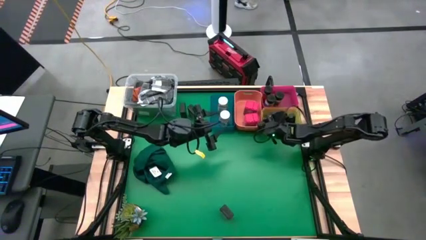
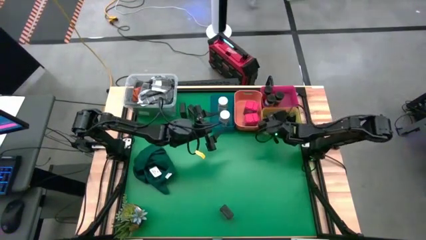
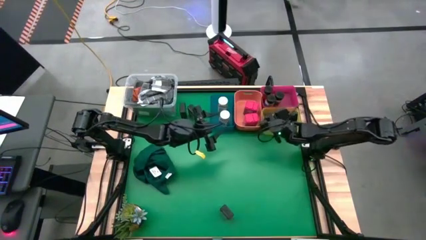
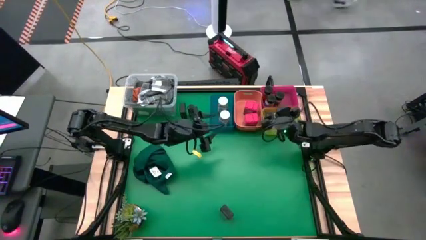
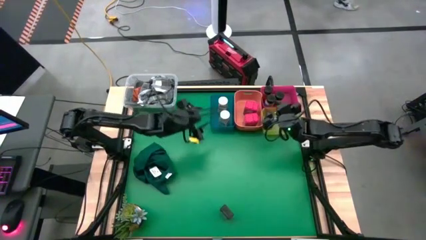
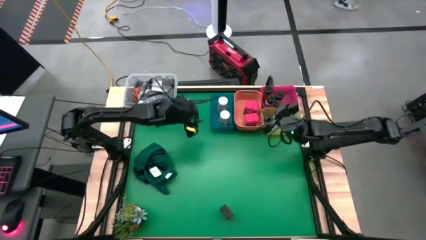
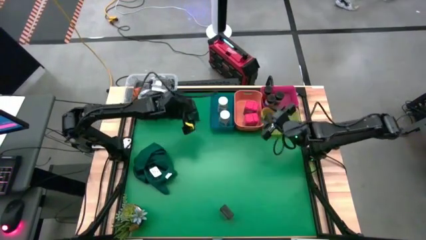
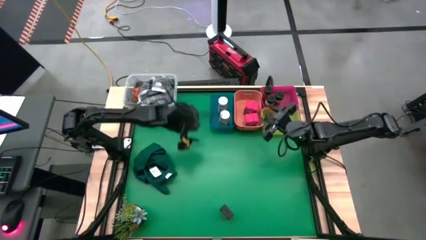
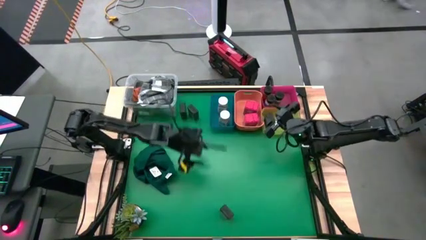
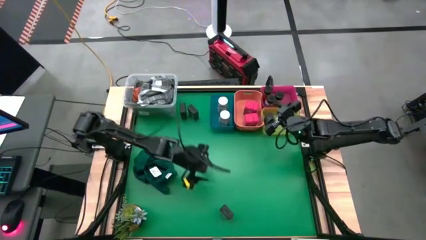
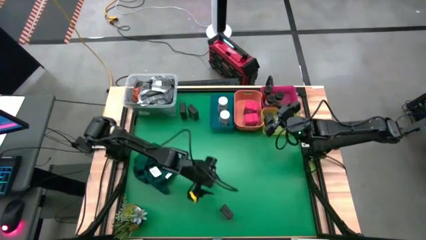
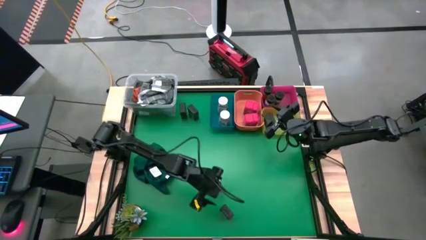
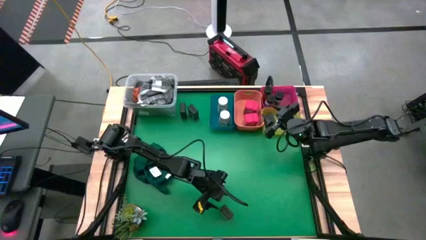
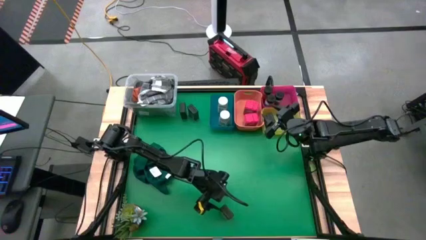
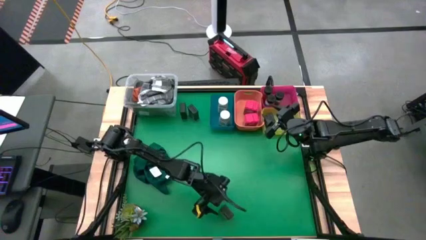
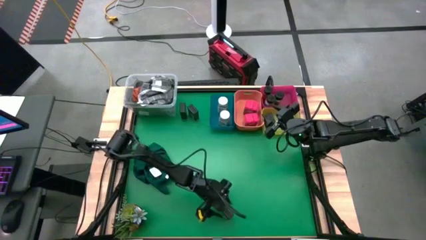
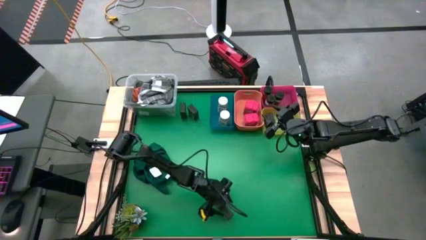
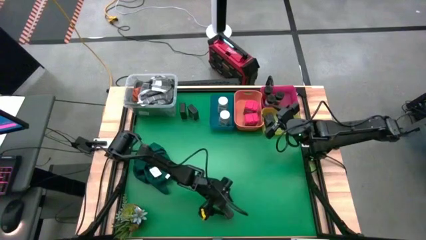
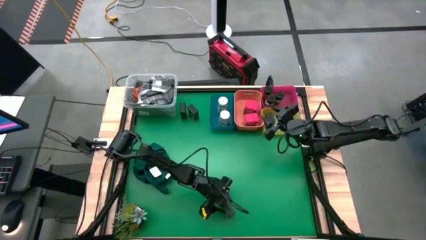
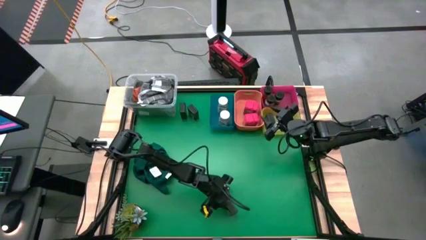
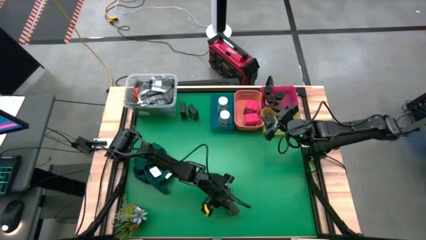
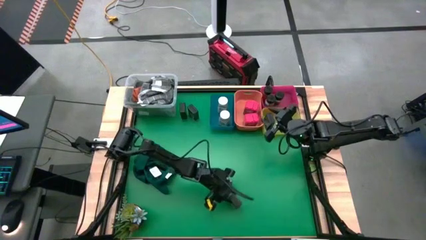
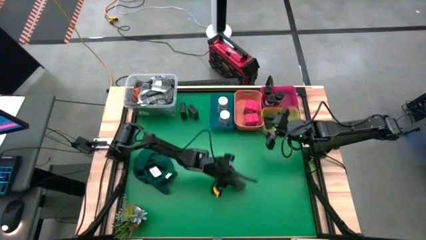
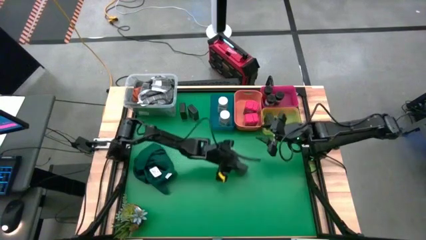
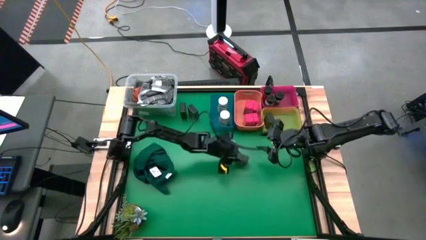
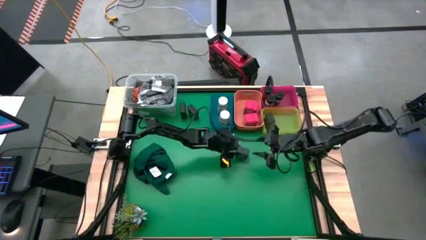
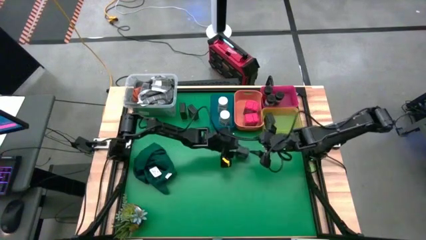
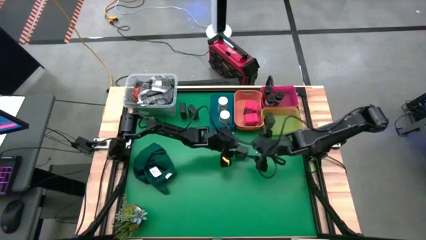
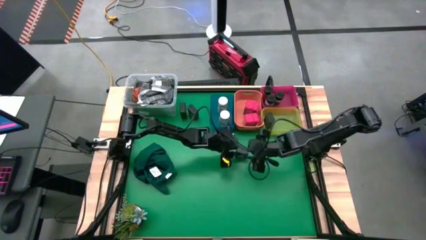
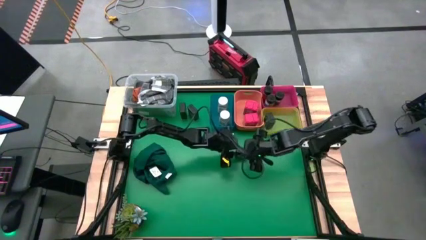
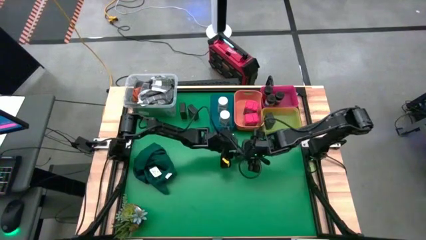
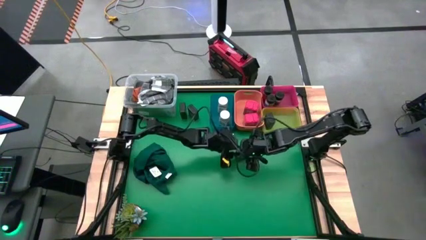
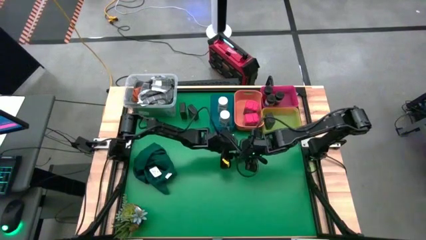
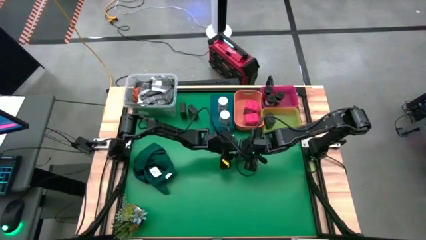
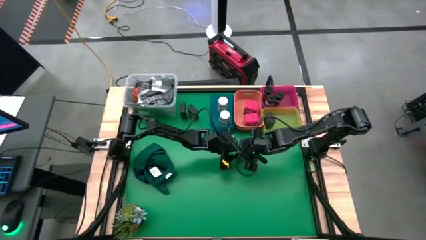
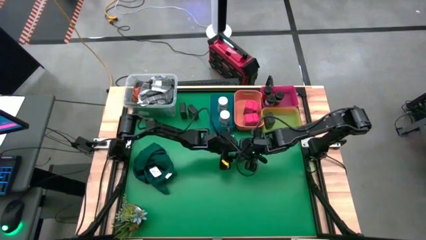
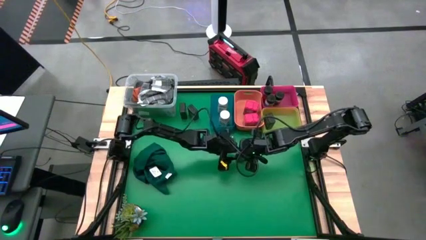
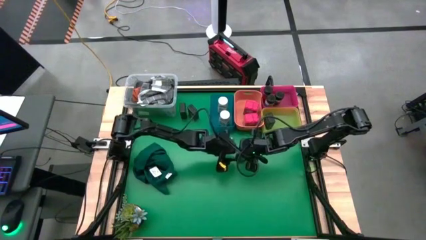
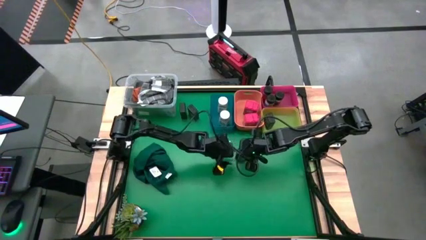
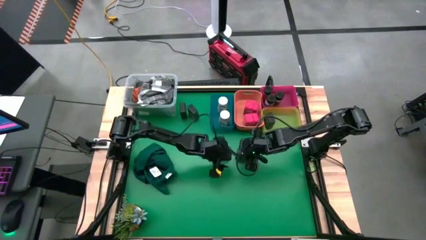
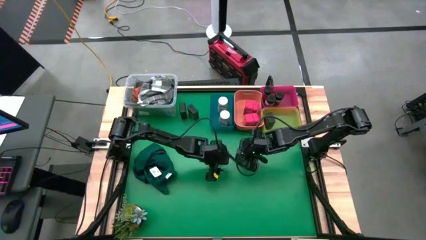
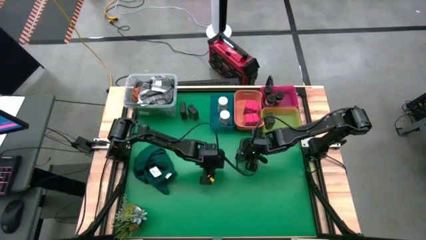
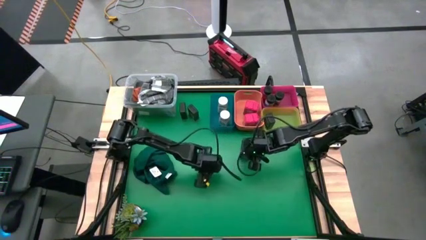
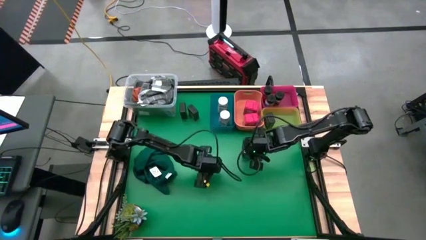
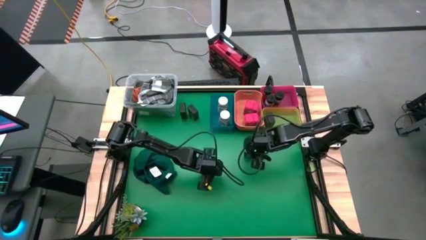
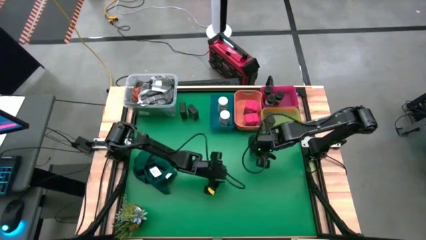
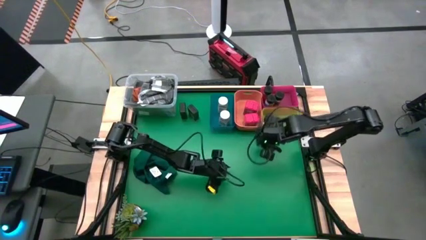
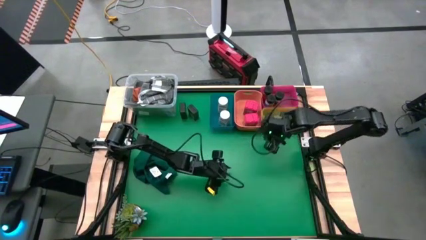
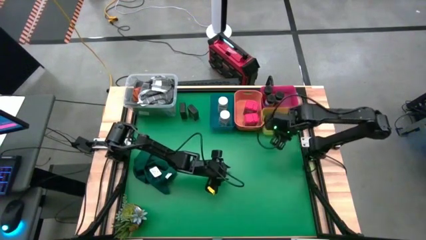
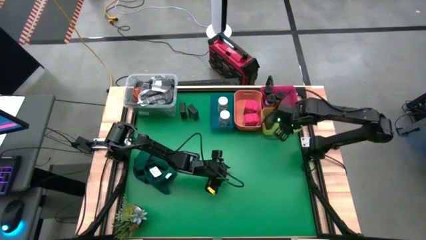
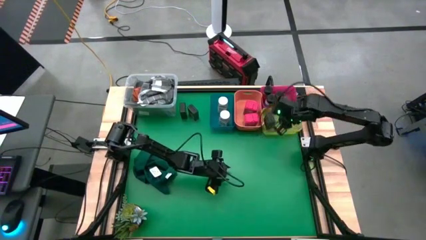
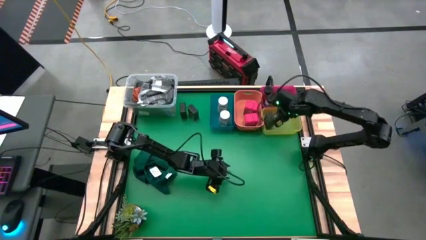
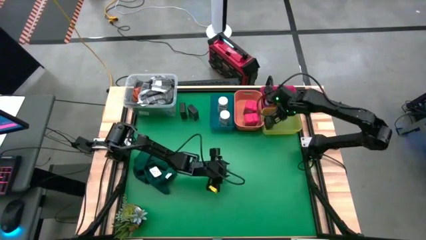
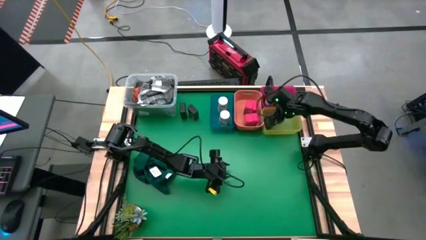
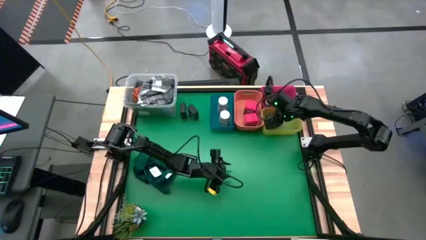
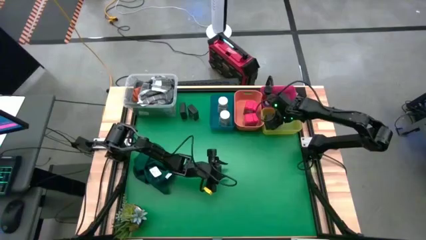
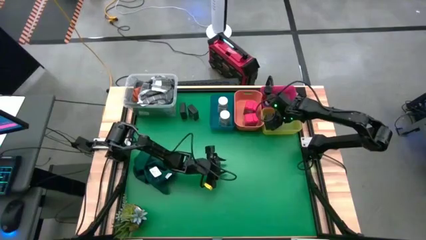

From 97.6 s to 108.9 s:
Task: Sort spices by type
Put the black seasoning can into the yellow bin

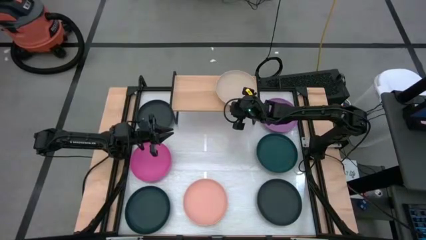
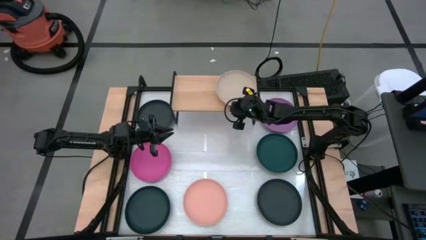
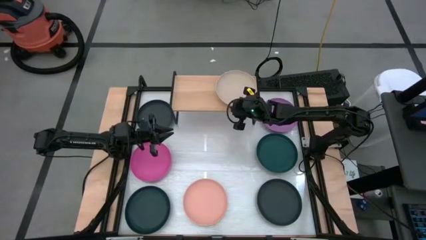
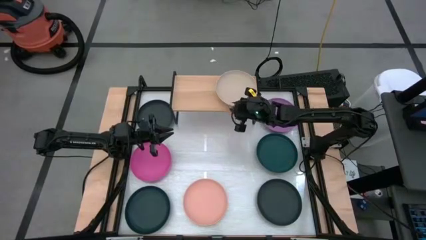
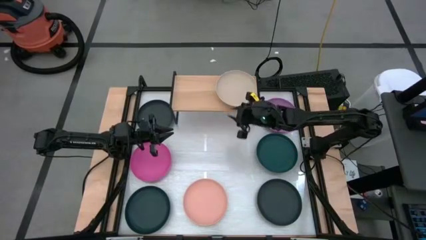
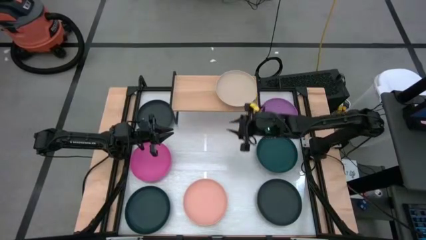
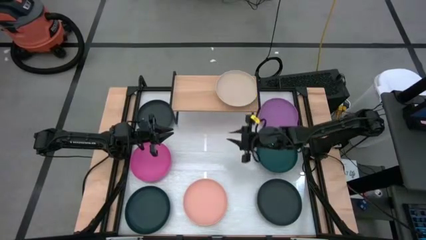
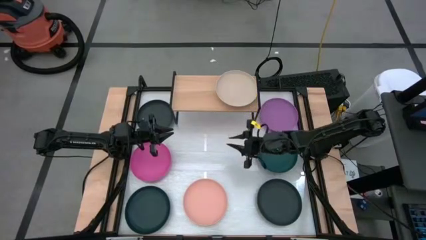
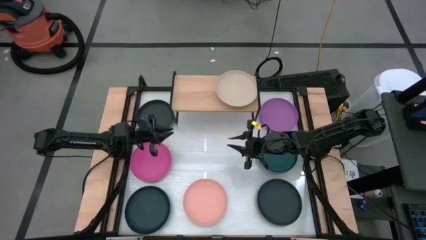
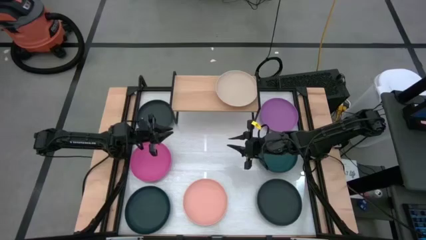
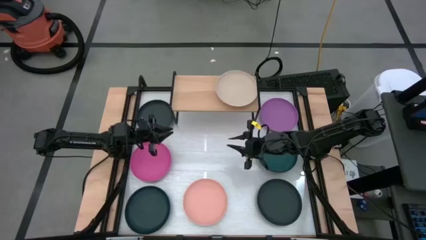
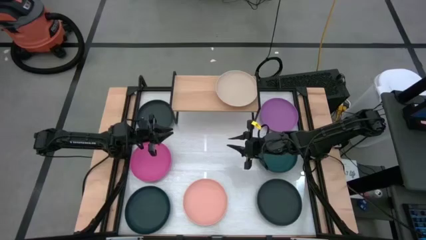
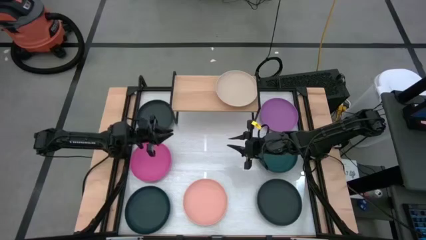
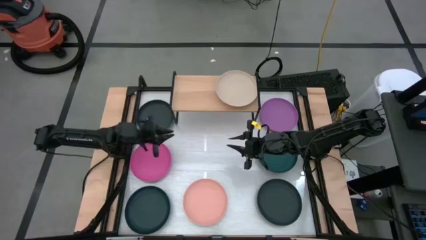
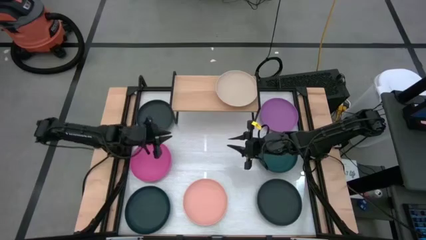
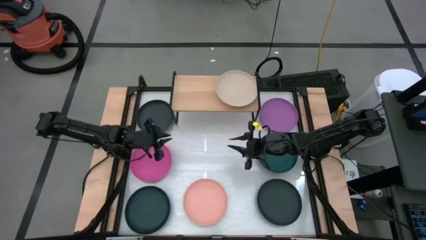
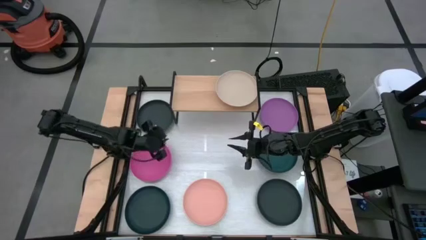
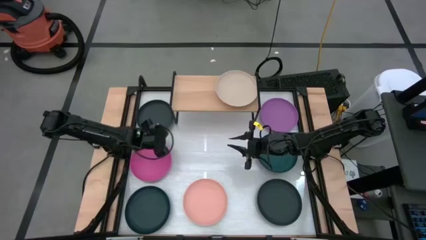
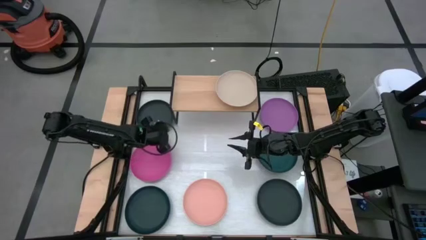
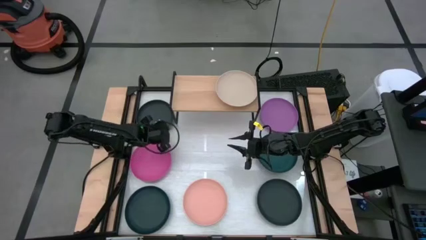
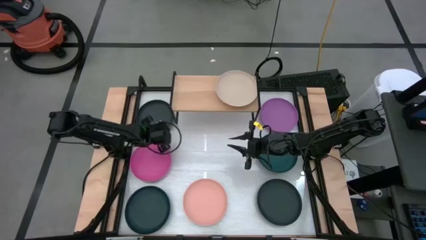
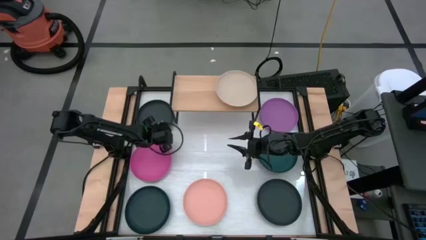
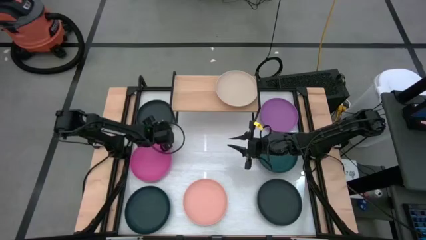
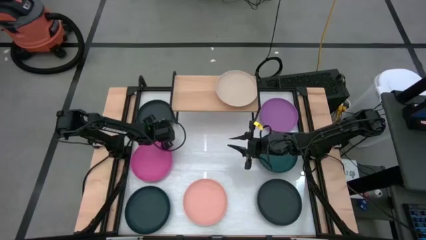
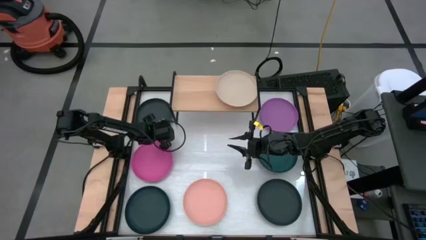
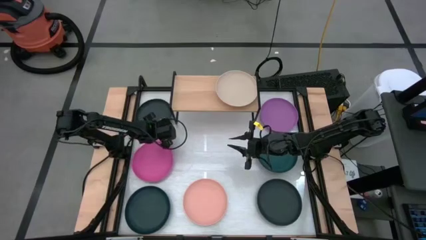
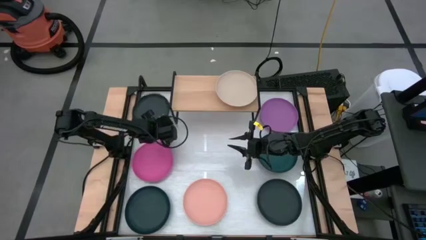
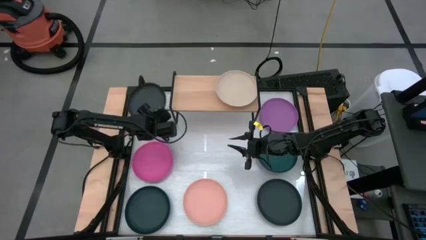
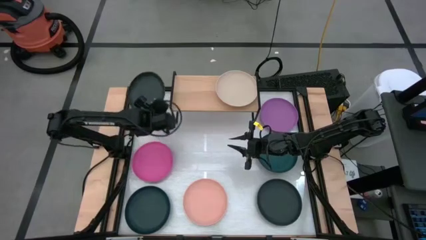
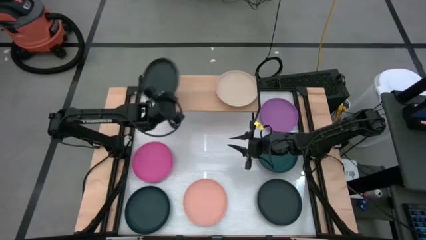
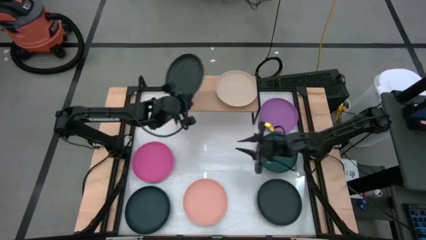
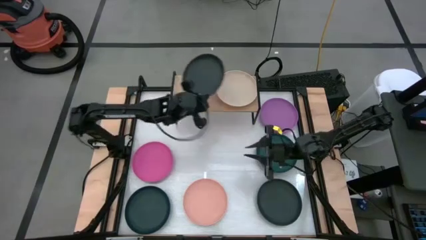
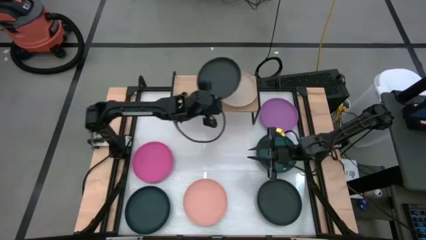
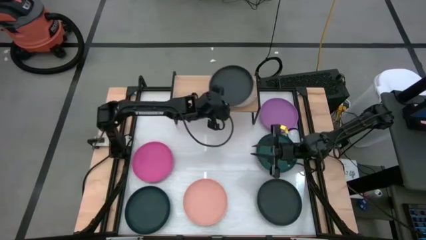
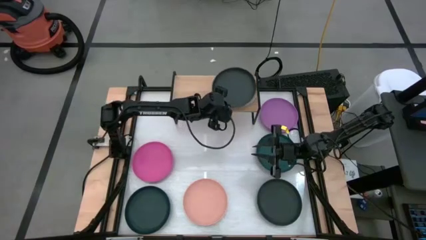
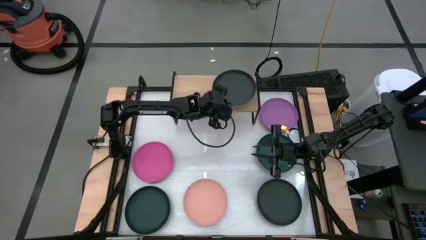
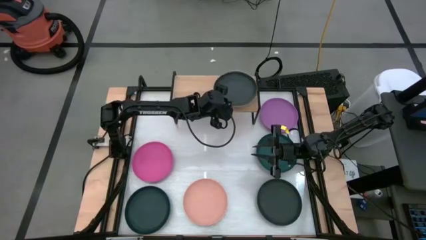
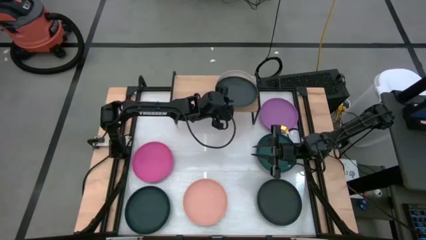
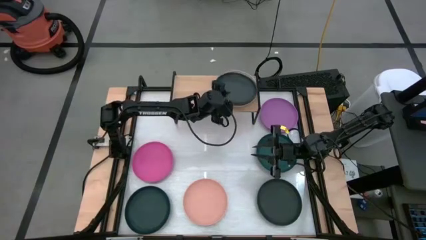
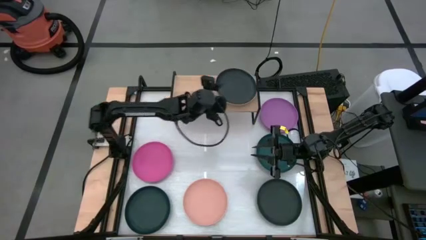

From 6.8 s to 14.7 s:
Task: Place and stack plates onto a shelf
Stack the top black plate on top of the brown plate on the shelf
